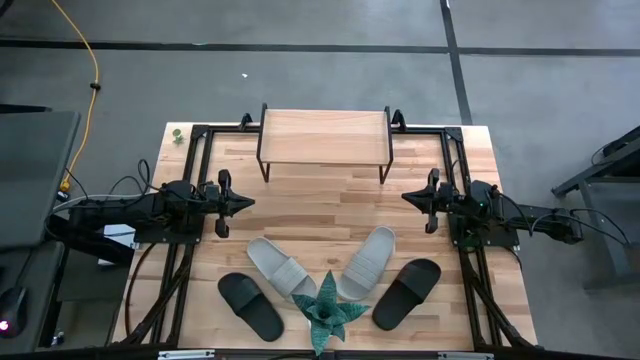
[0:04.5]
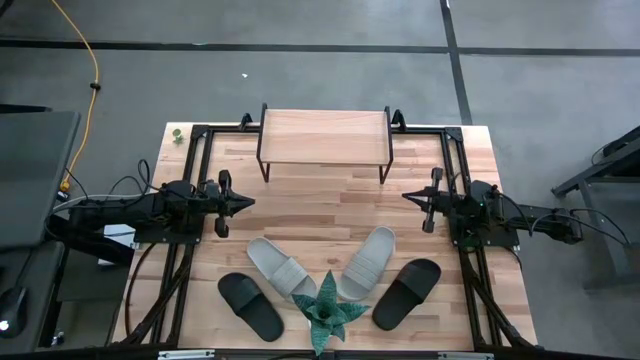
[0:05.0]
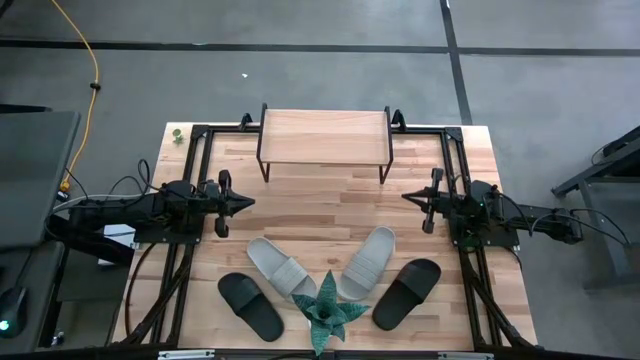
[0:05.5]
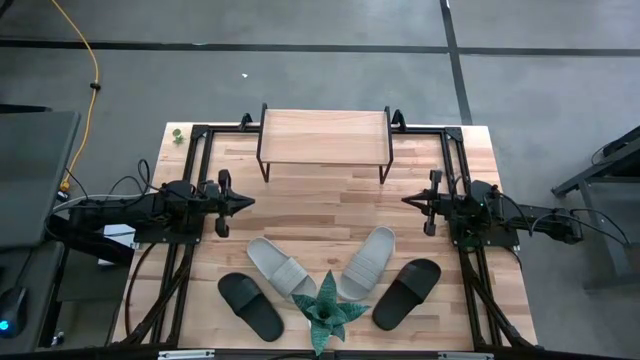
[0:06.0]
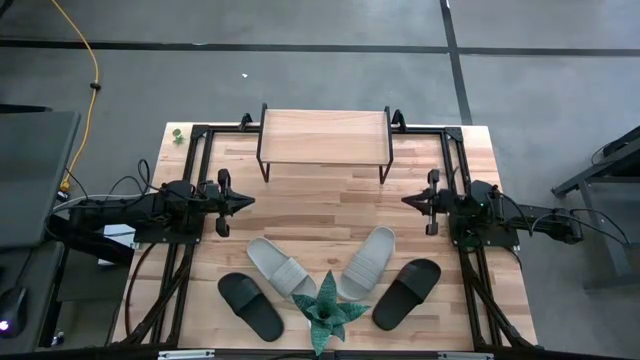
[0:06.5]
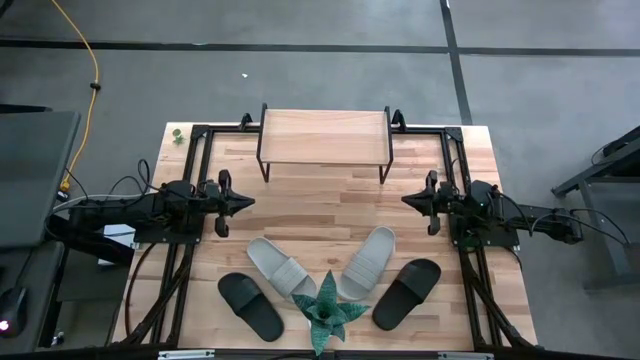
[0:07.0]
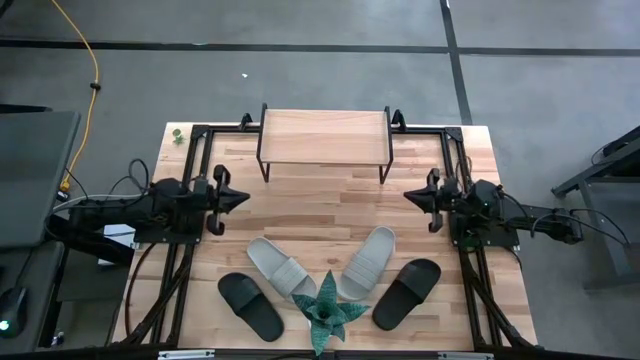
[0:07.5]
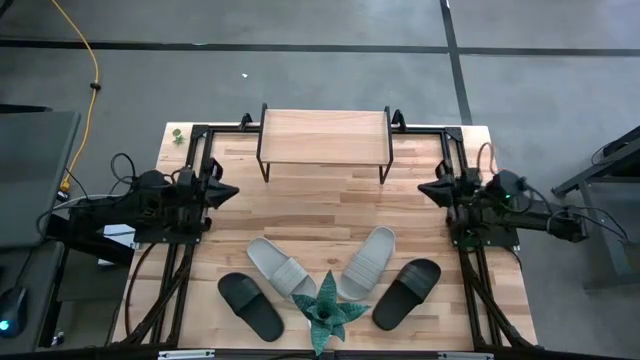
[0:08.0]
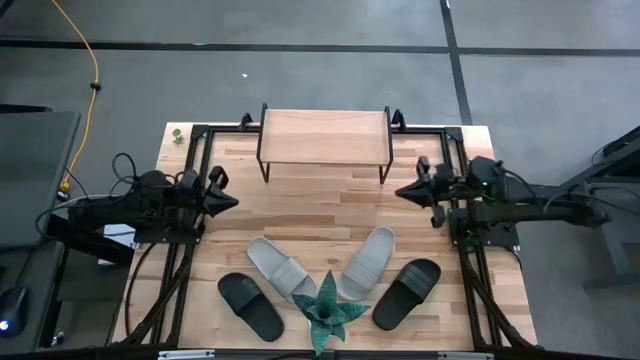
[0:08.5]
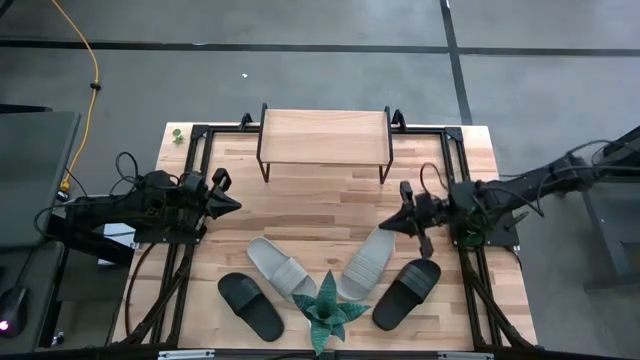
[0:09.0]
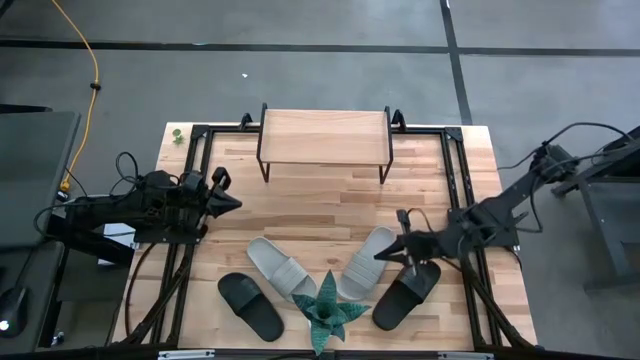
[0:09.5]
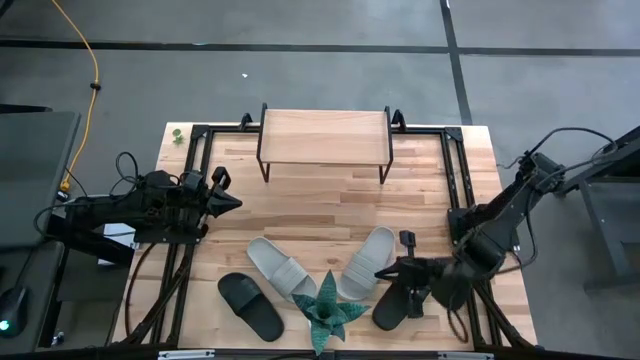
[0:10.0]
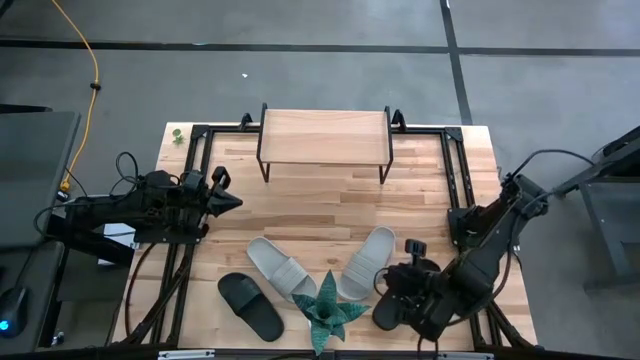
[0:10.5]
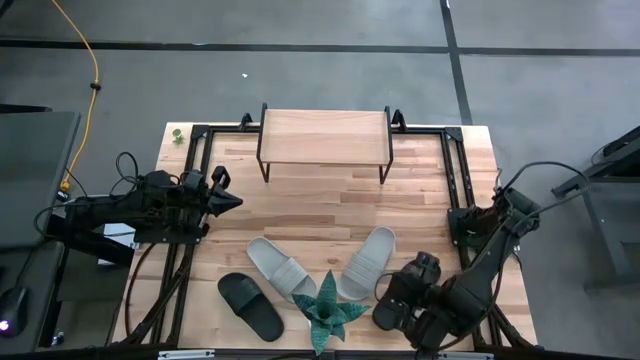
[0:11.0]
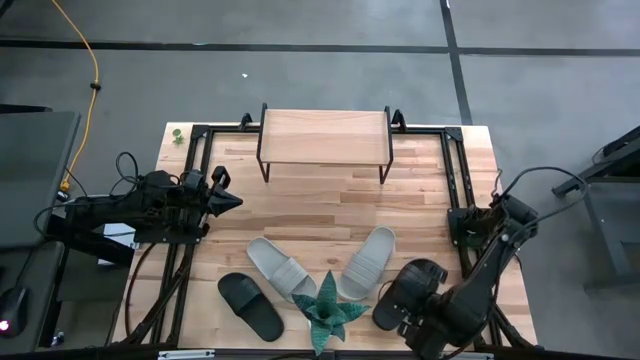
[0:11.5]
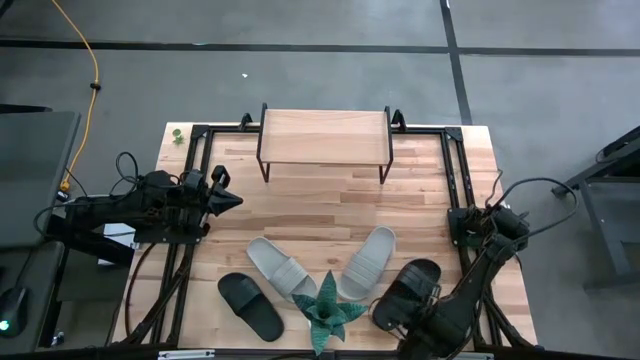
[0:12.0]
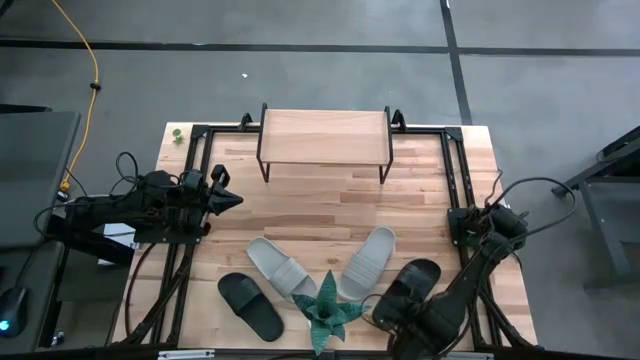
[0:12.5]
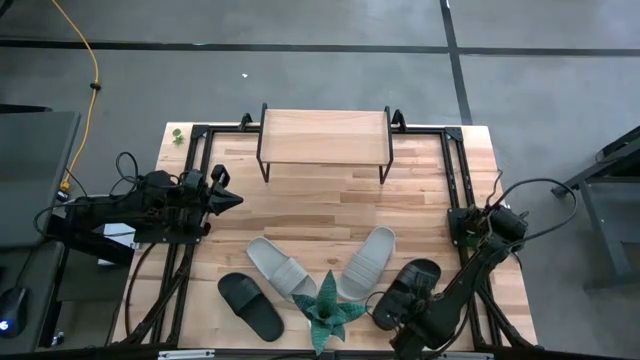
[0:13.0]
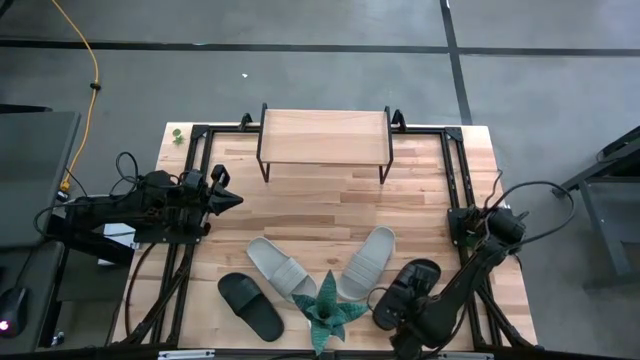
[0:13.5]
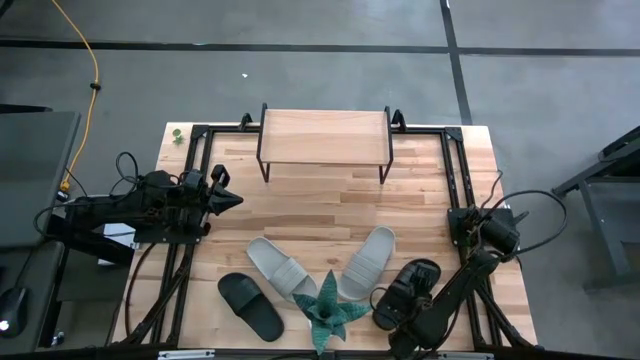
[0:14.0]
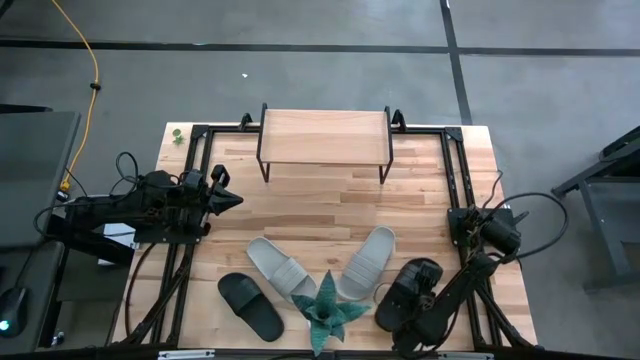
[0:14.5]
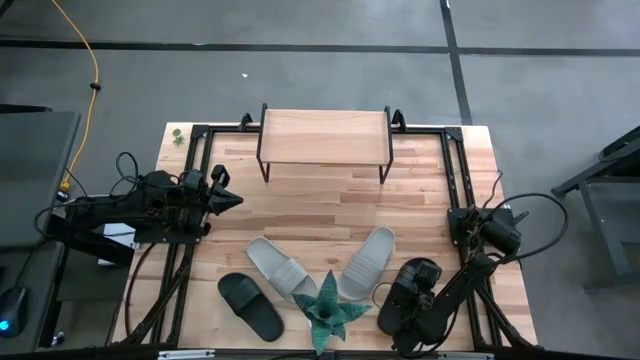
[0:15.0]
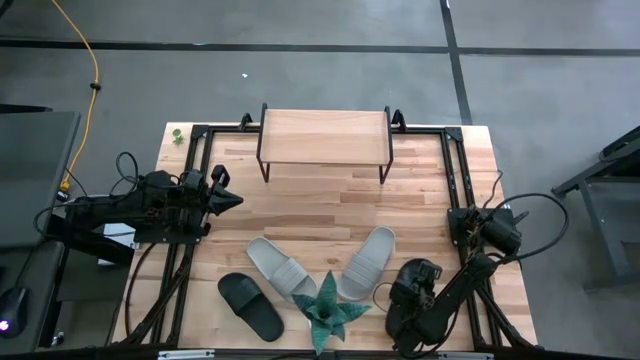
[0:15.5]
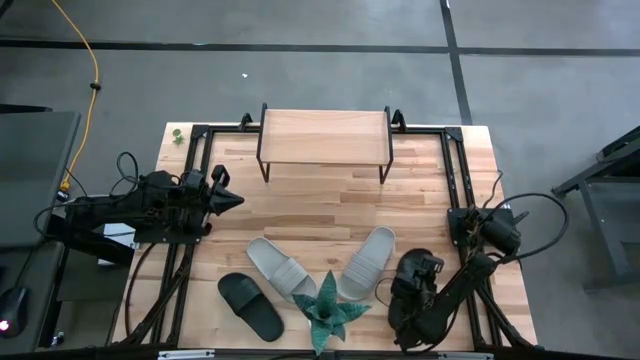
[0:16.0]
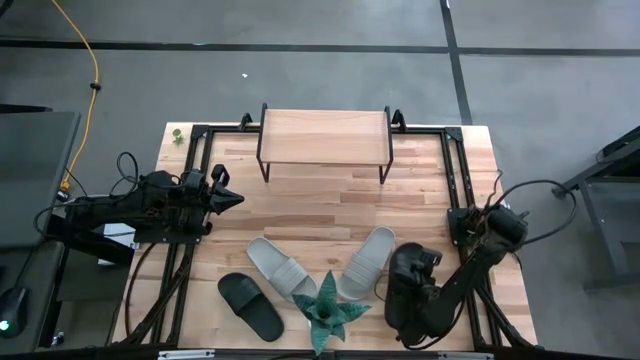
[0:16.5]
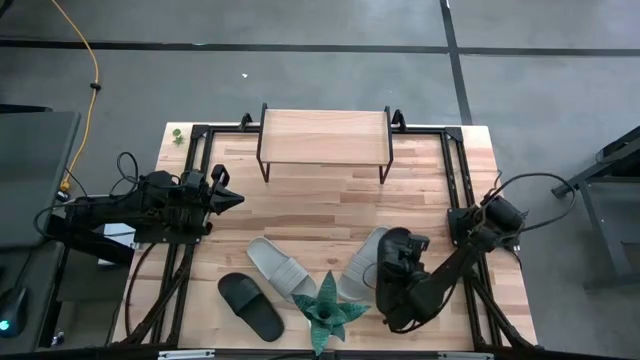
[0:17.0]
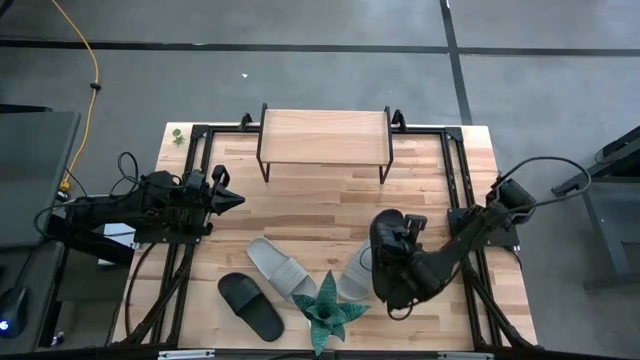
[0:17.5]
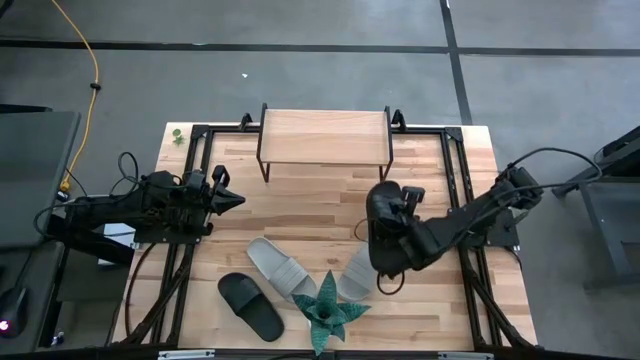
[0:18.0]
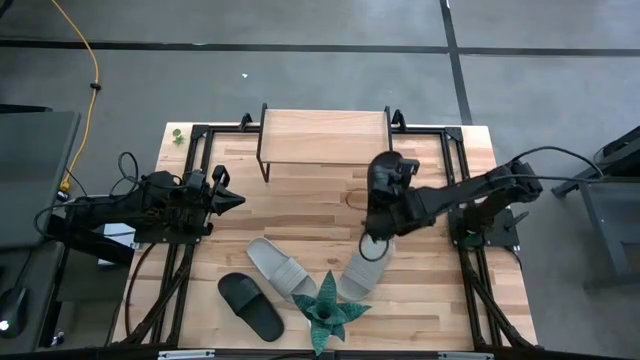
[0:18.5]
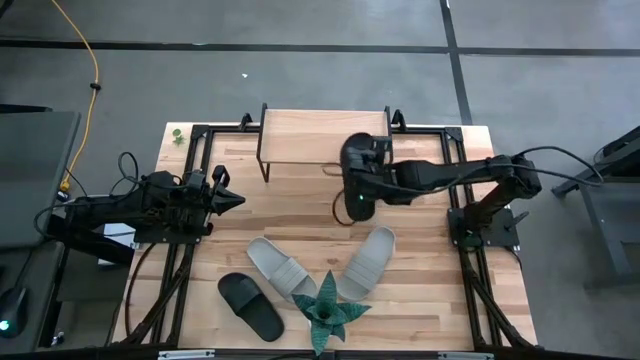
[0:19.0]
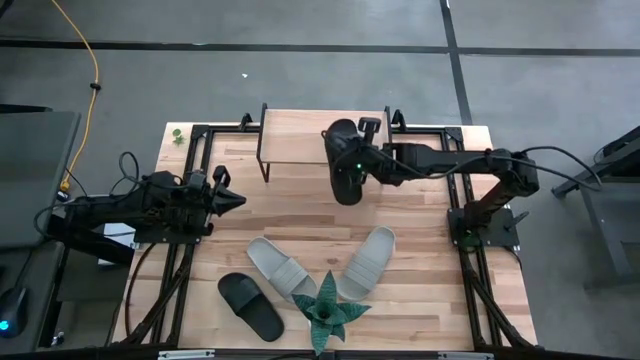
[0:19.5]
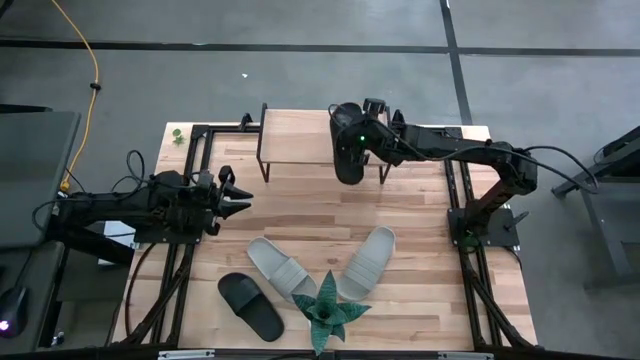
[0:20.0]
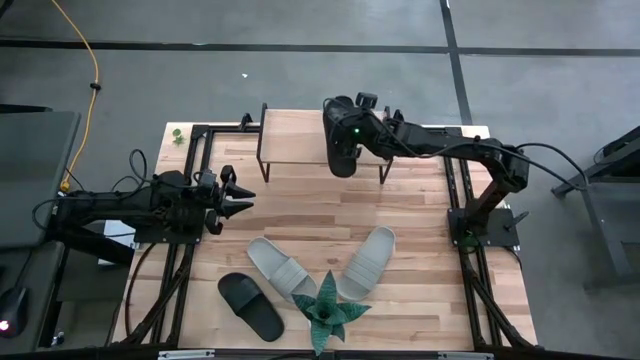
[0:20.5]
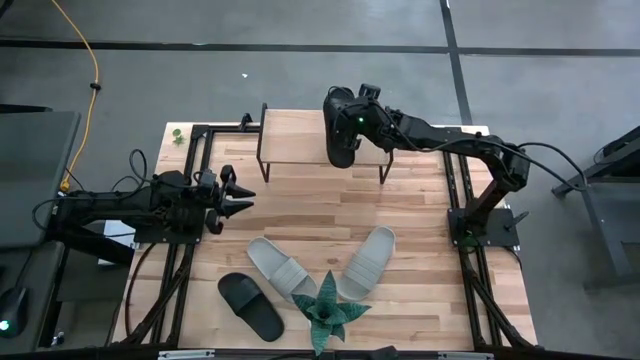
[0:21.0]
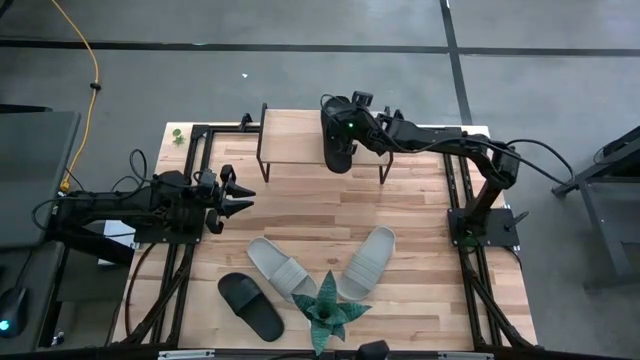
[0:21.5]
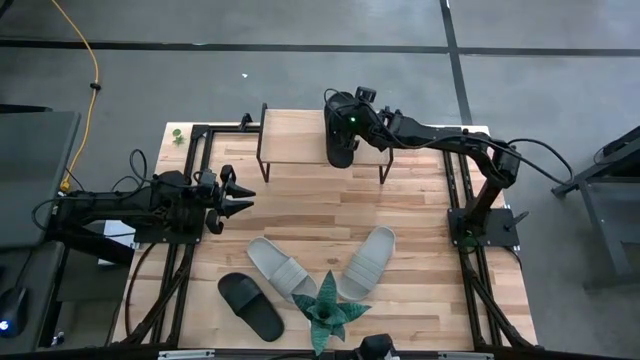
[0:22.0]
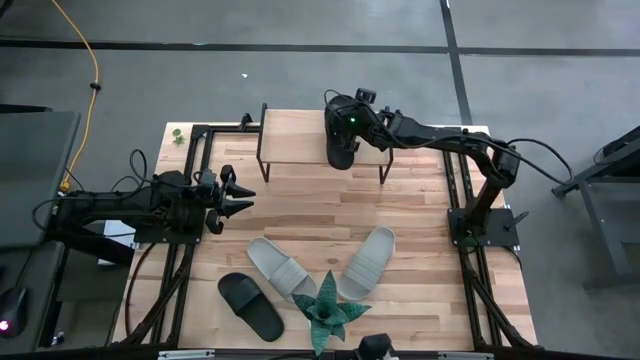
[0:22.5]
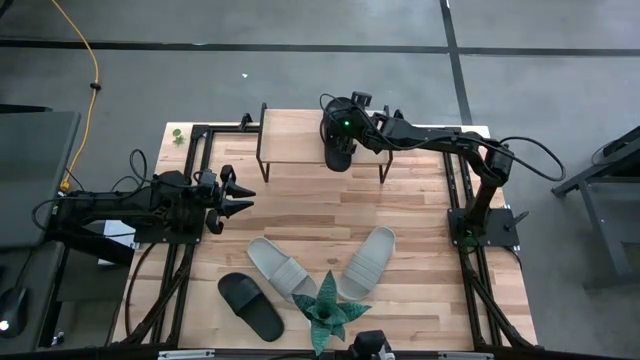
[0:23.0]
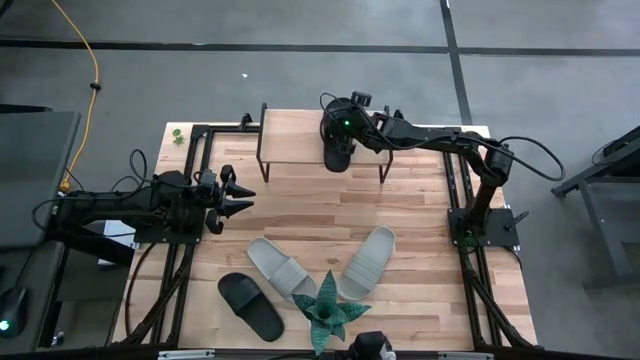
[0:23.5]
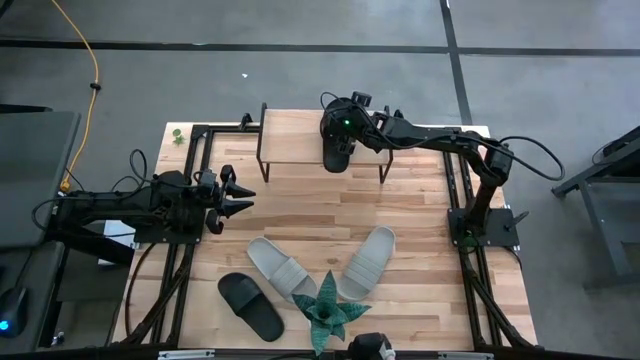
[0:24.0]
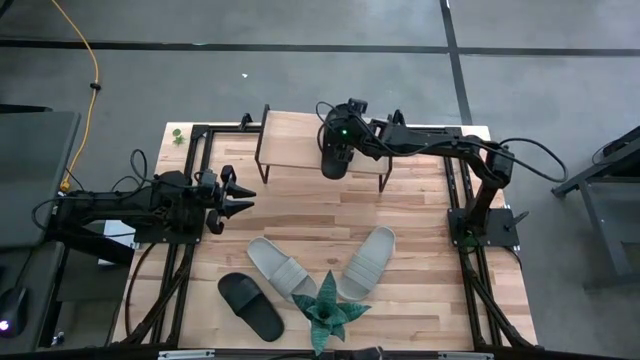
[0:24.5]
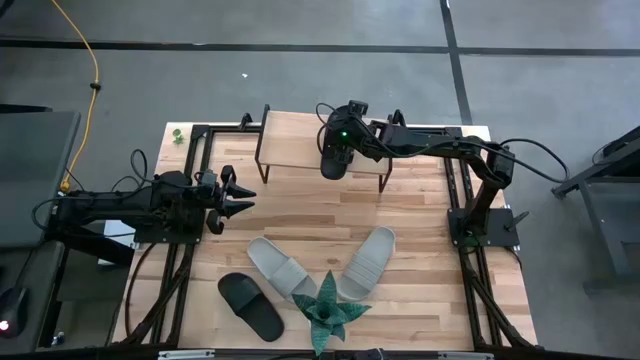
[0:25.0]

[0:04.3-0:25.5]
Task: Pick and place slides into the shelf
Put the right black slipper on the shelf
